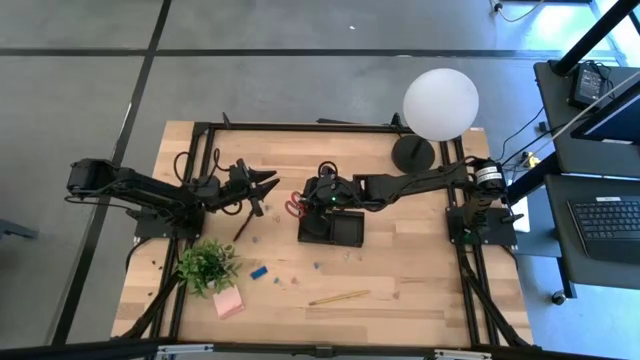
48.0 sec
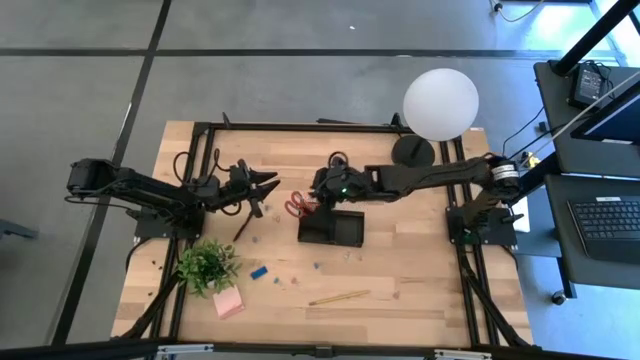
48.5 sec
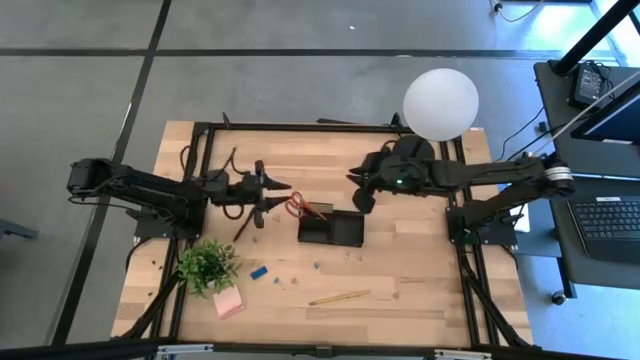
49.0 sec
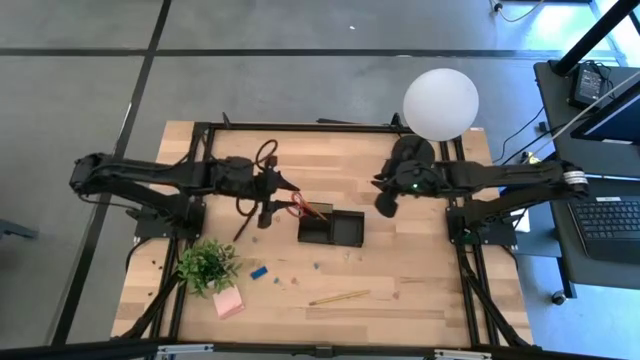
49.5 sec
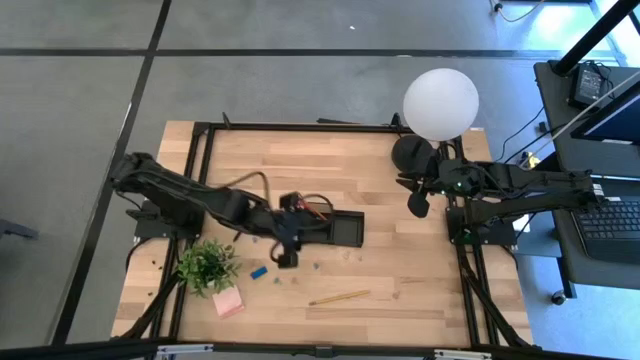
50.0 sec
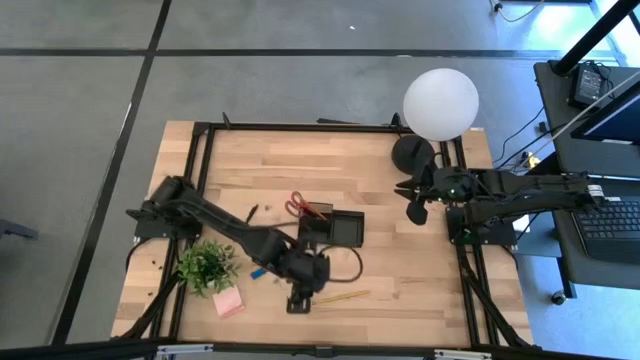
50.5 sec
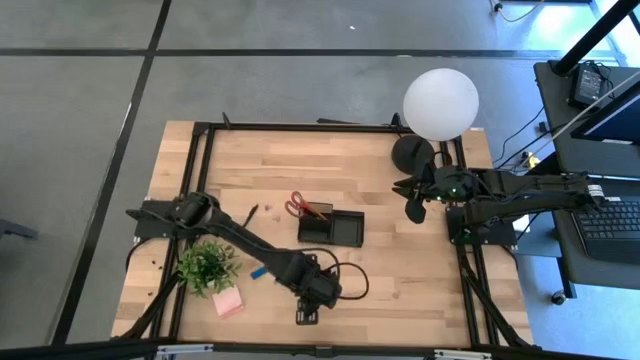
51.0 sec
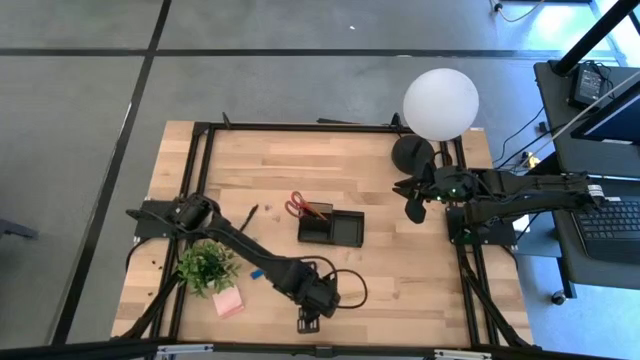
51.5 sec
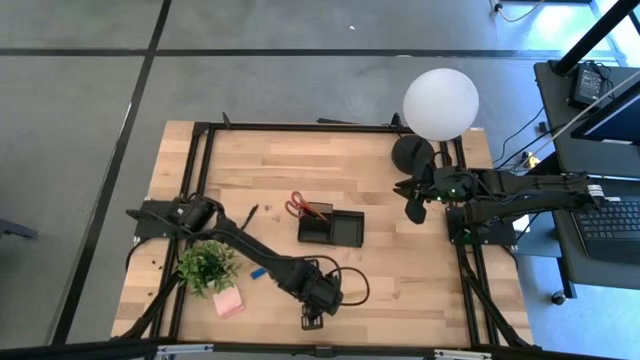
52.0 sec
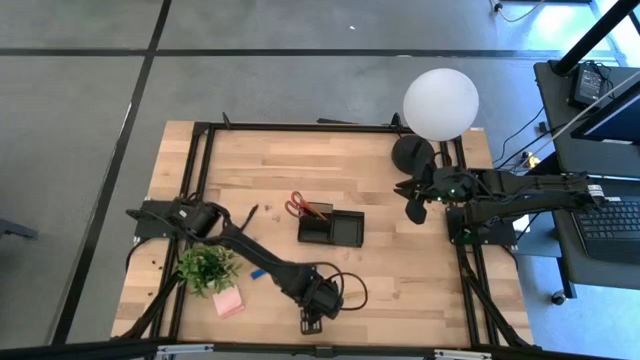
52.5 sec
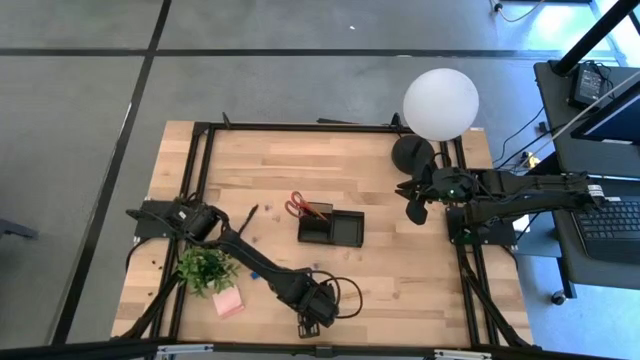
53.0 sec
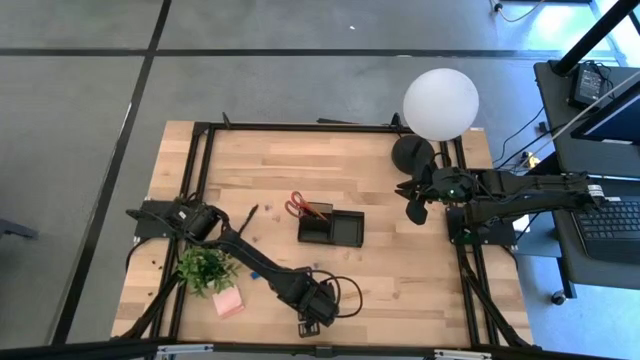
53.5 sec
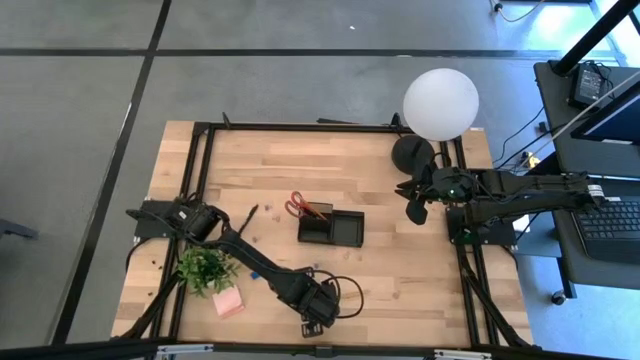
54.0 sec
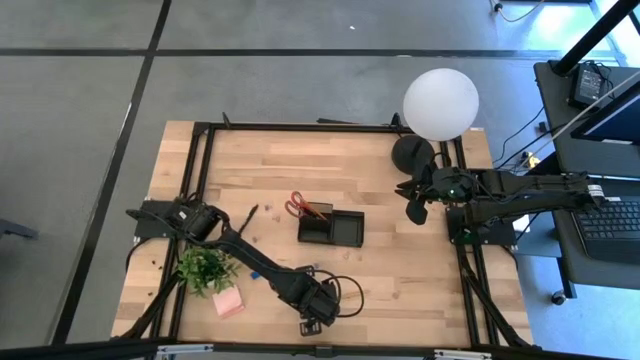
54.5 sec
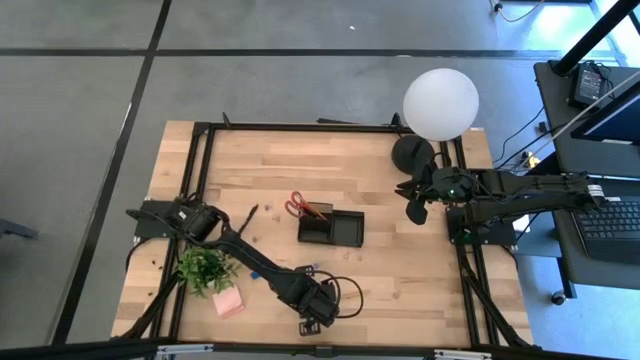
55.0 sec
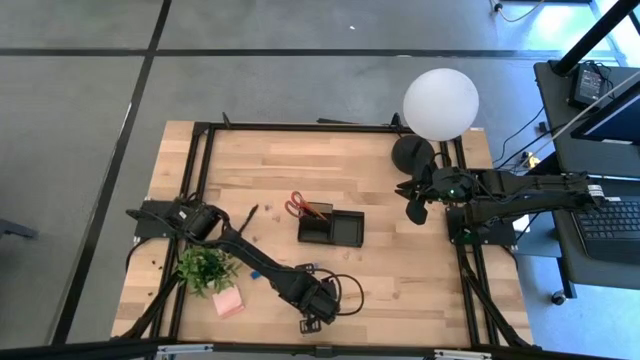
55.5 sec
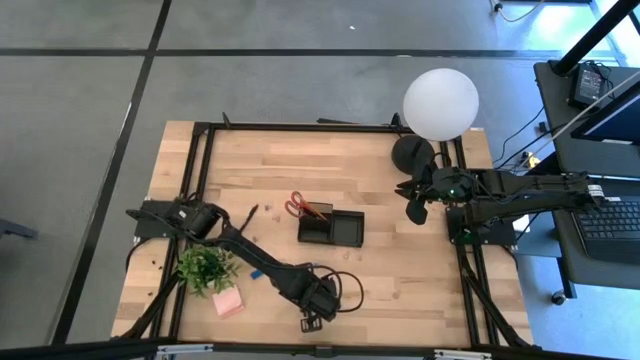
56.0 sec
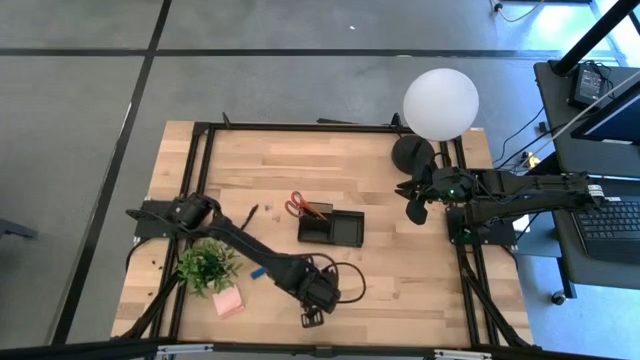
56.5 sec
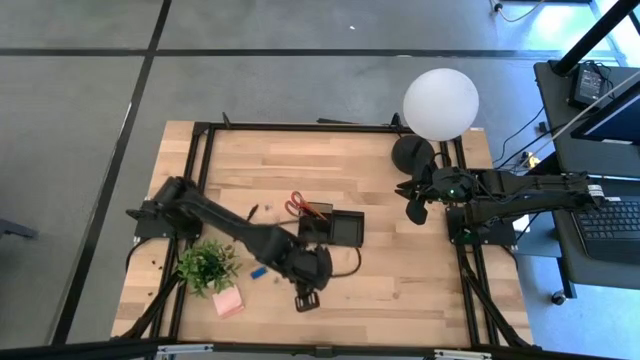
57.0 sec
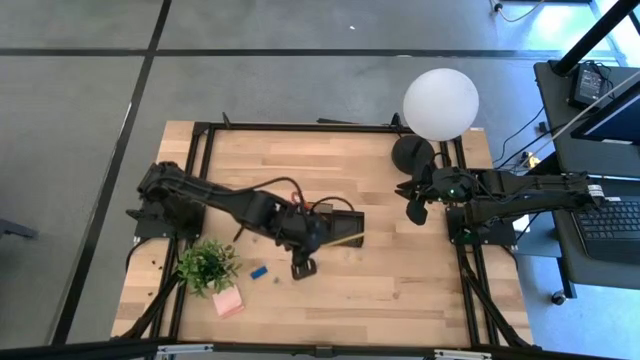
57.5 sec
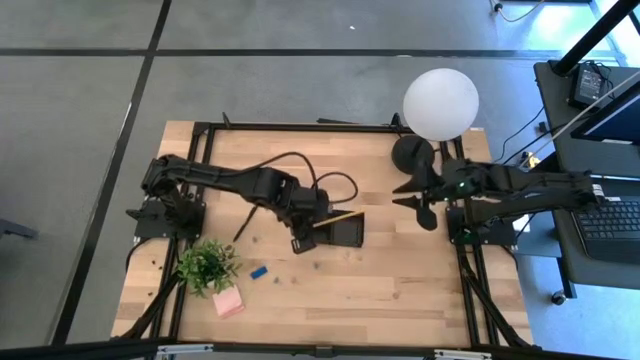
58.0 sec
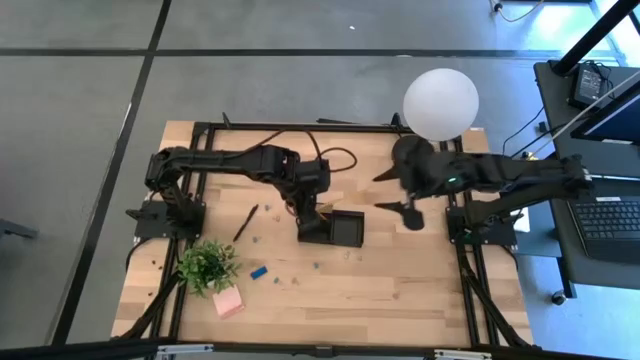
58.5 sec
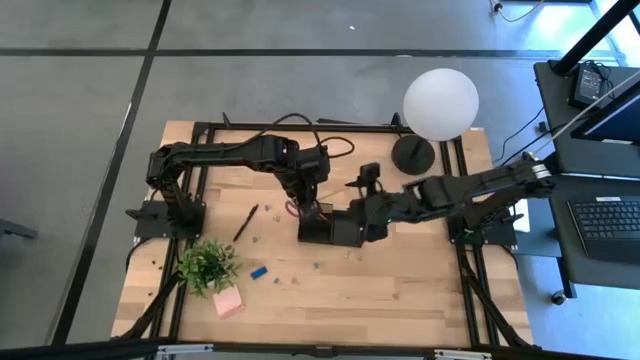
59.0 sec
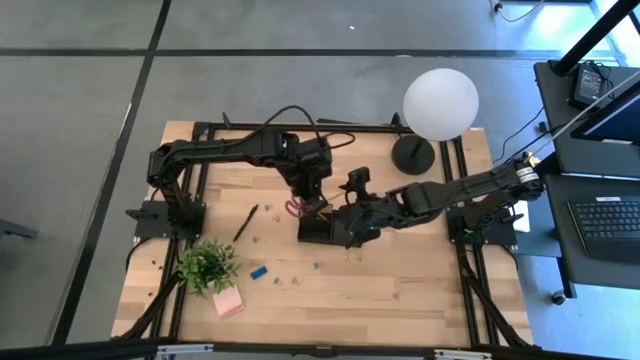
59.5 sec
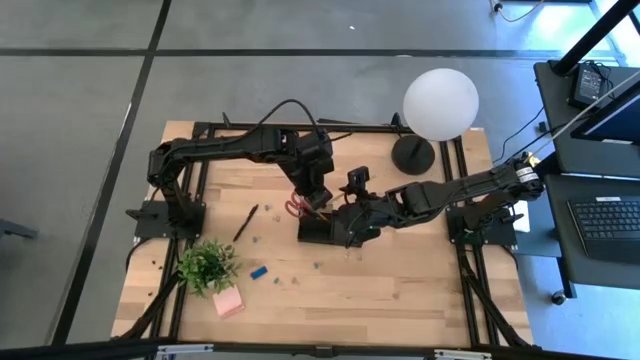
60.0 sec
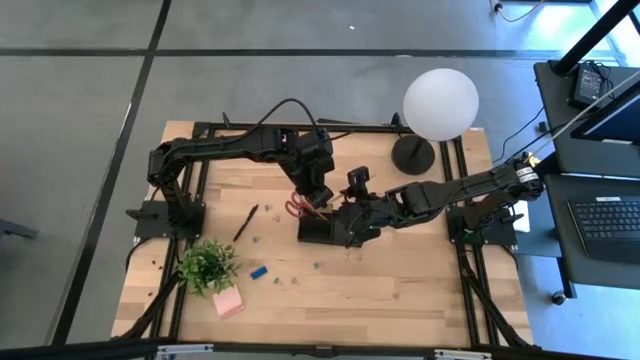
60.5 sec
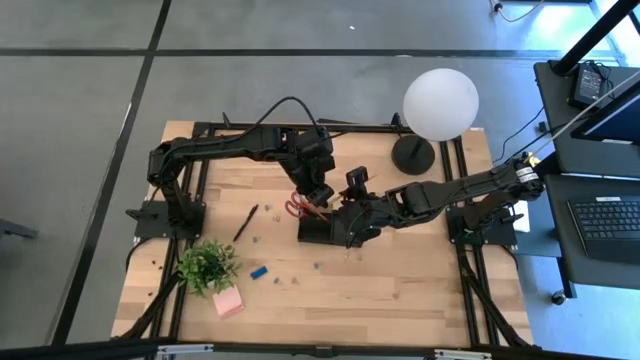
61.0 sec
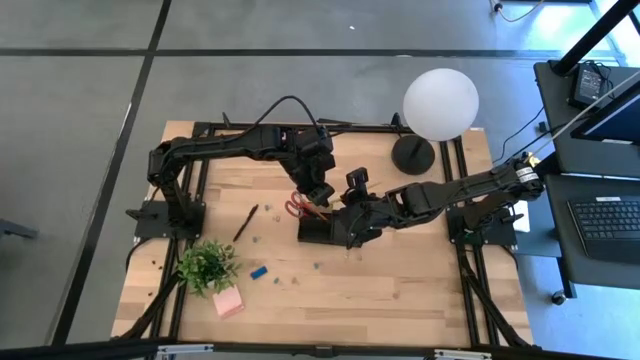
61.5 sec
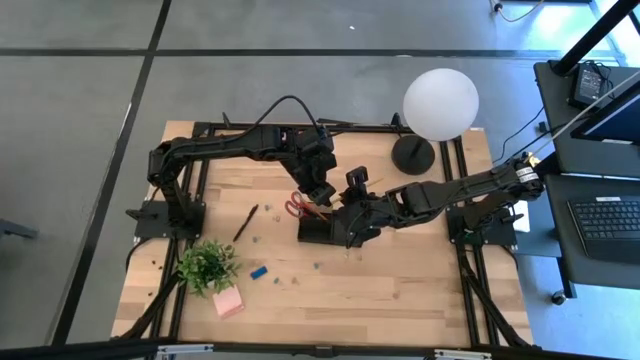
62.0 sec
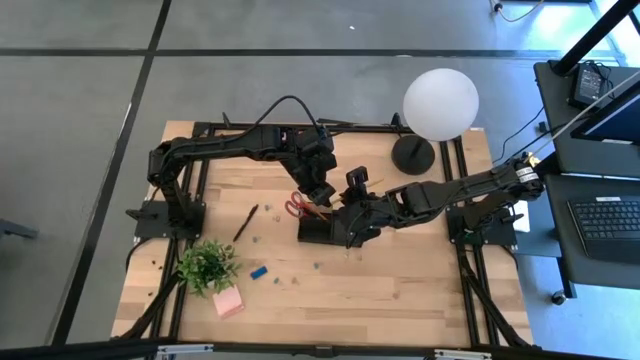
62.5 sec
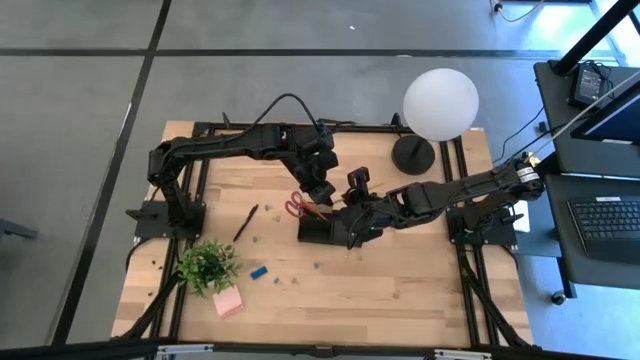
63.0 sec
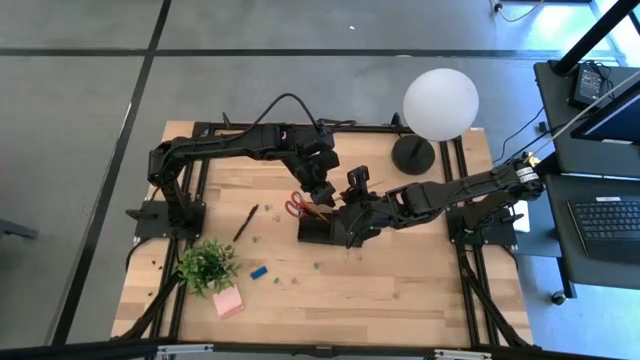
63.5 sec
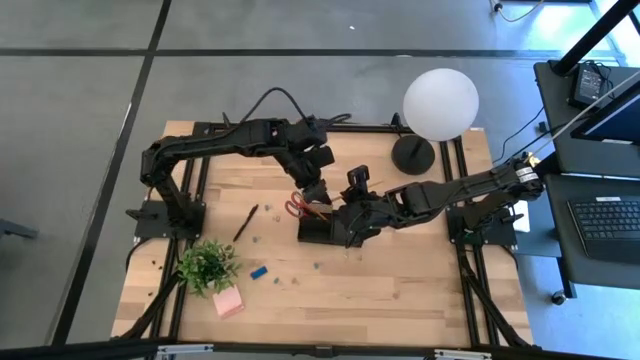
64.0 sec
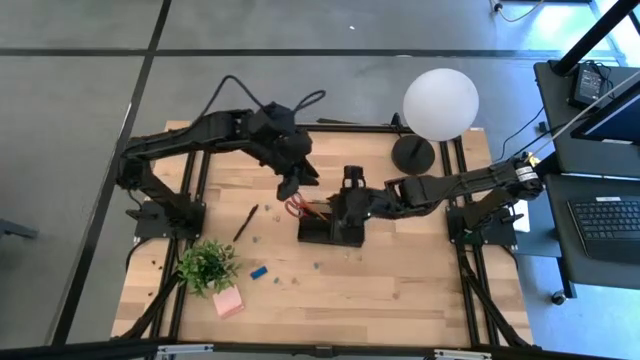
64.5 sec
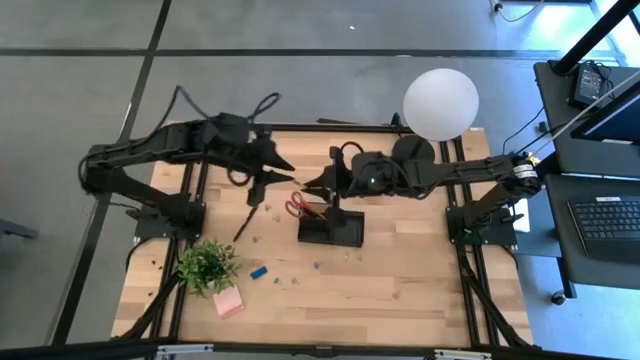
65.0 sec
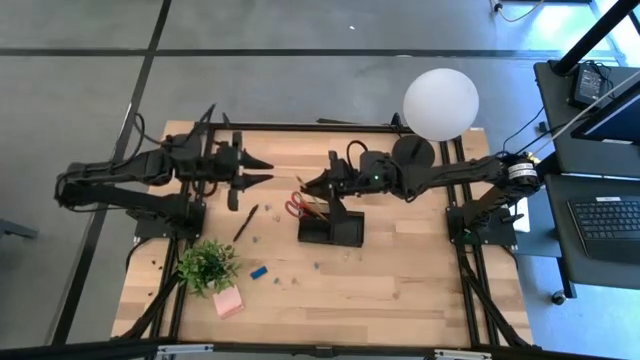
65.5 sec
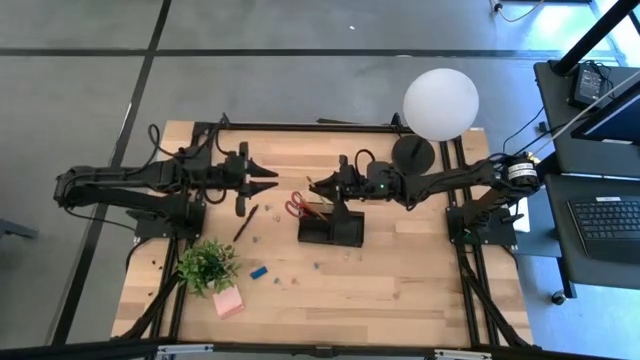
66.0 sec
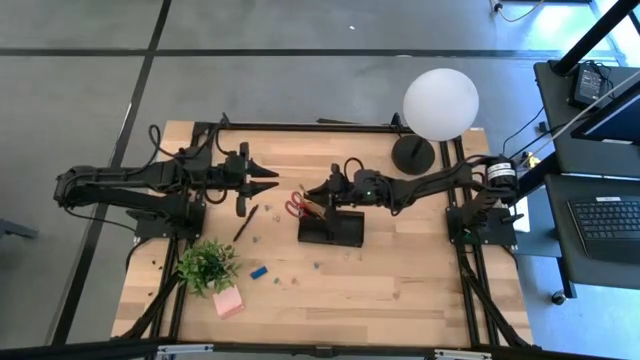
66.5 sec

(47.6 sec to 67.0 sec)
Task: Pick and place office supplies into organizer
Put the light yellow pencil into the black desk organizer

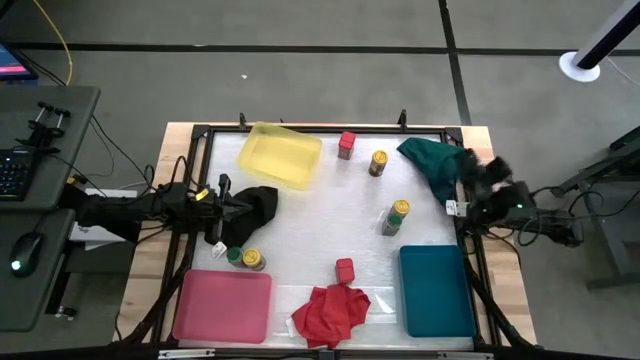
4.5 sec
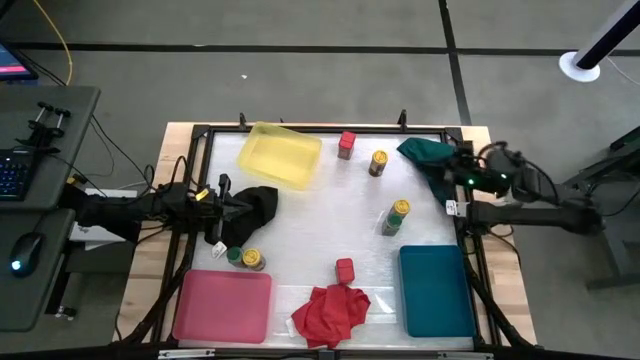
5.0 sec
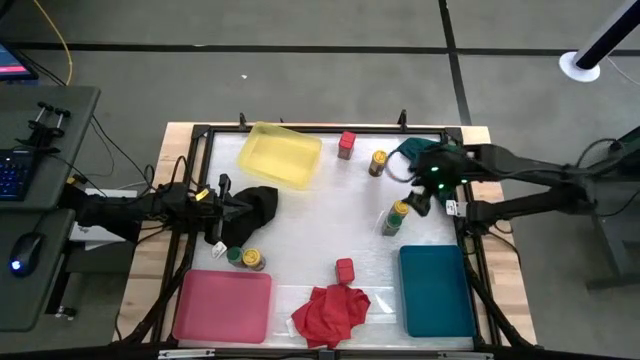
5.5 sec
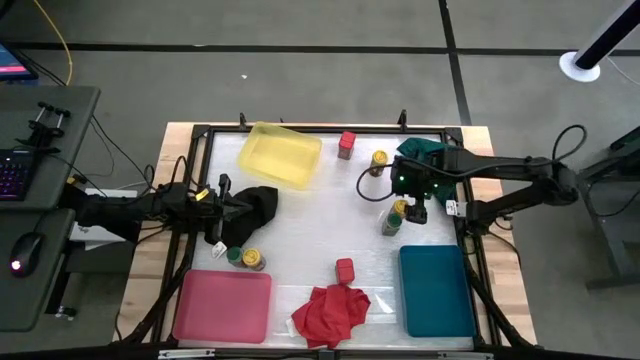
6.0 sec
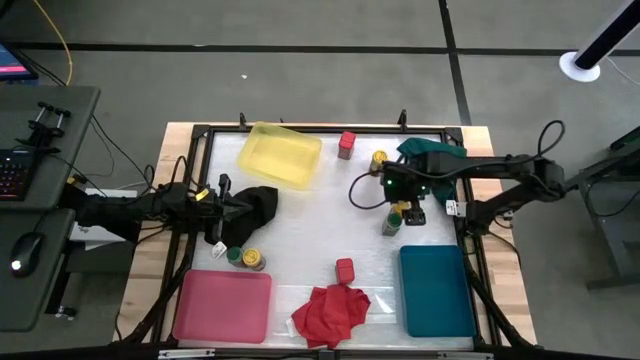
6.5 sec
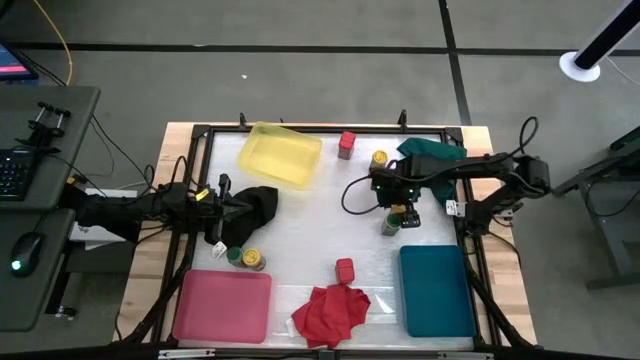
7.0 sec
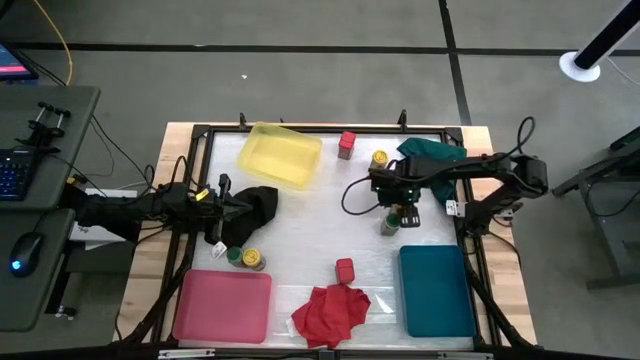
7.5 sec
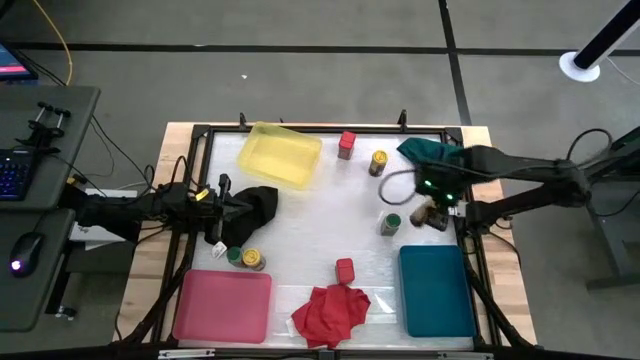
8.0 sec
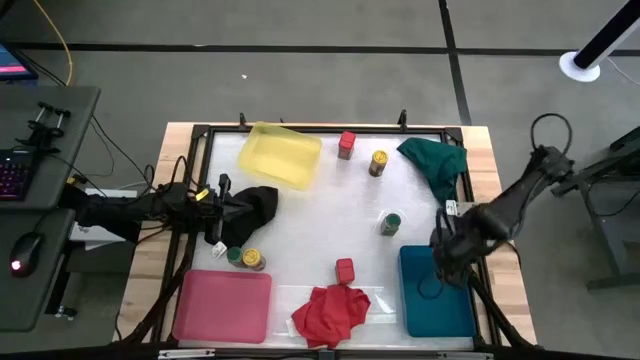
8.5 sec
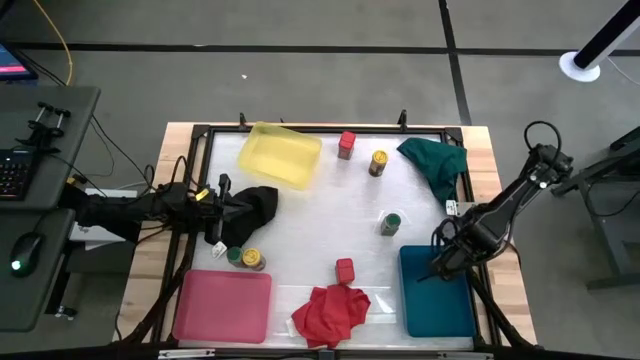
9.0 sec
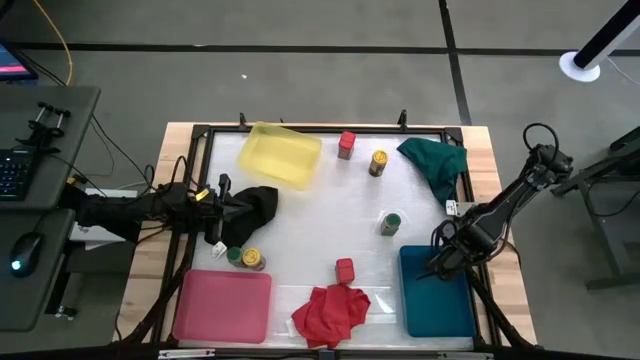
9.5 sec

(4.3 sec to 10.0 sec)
Task: Sort spices by type
Put the middle right yellow seasoning bottle into the blue bin
